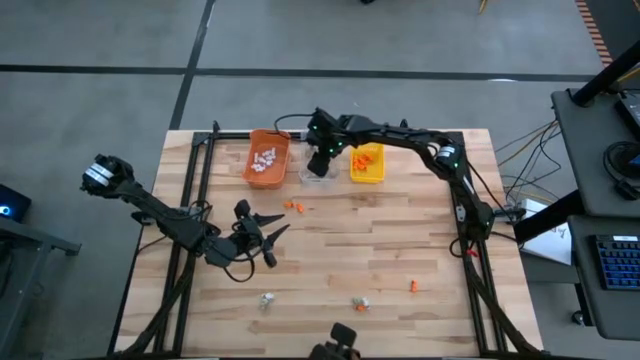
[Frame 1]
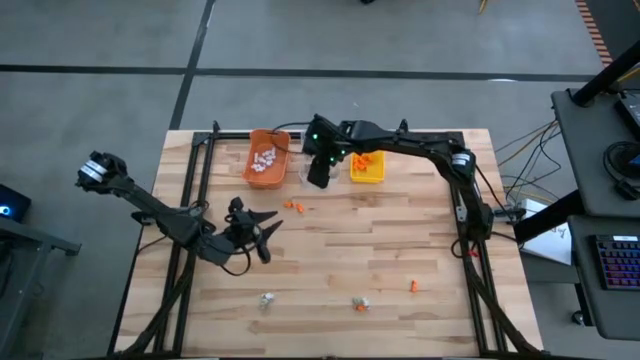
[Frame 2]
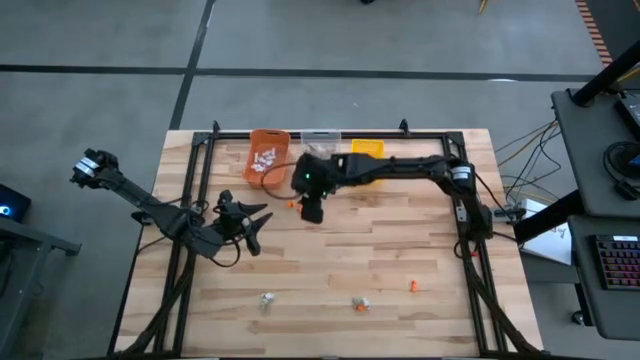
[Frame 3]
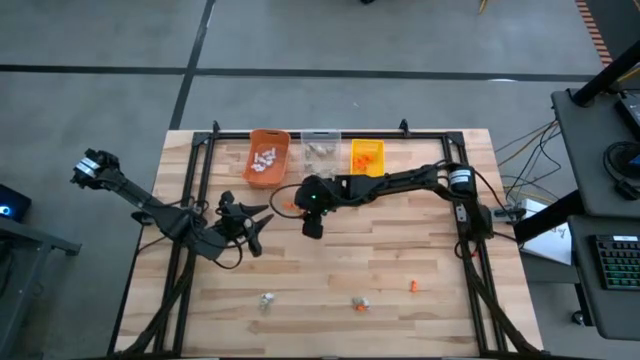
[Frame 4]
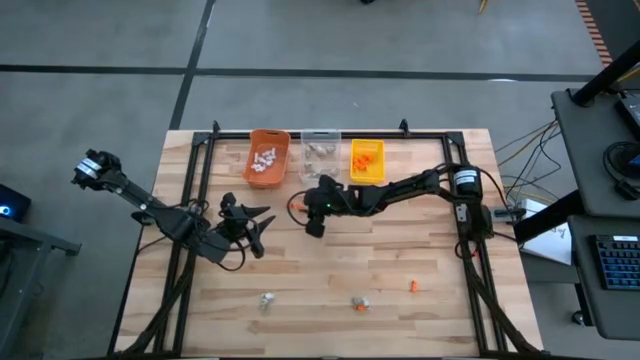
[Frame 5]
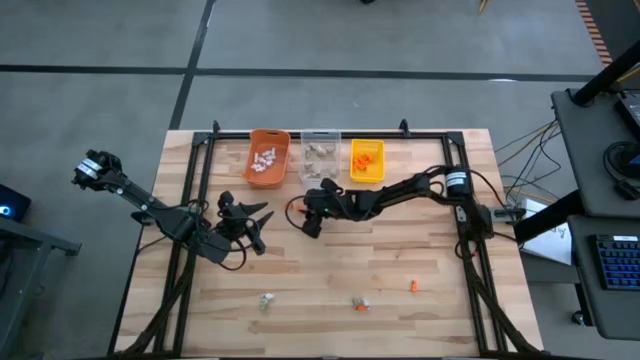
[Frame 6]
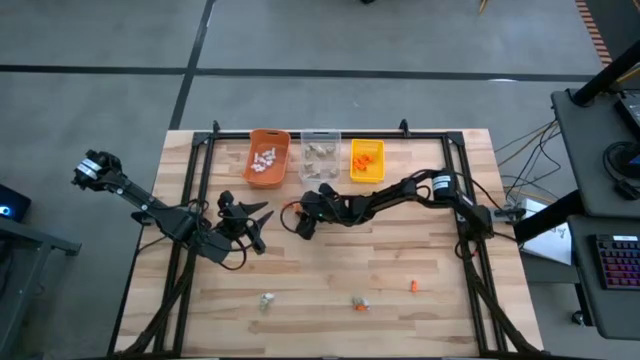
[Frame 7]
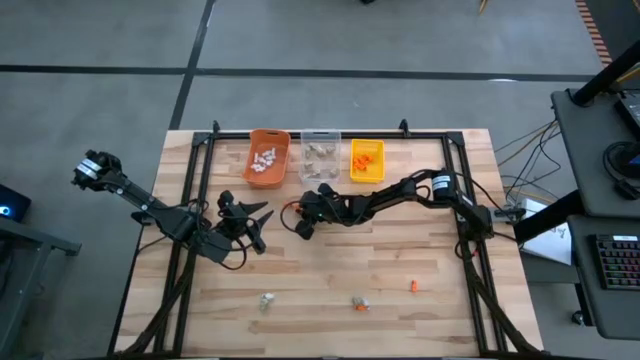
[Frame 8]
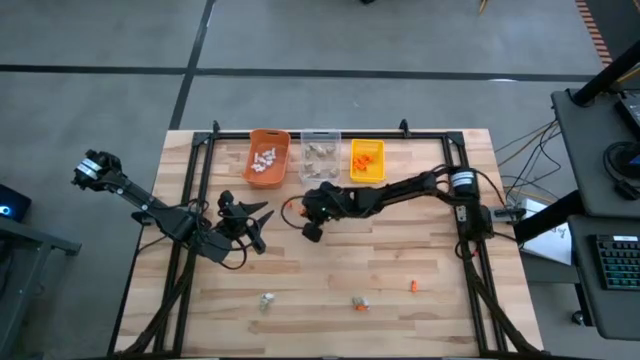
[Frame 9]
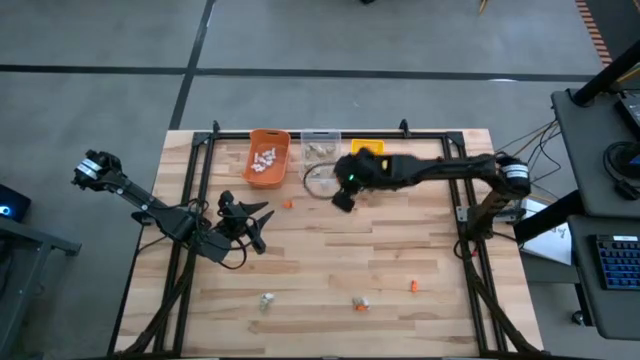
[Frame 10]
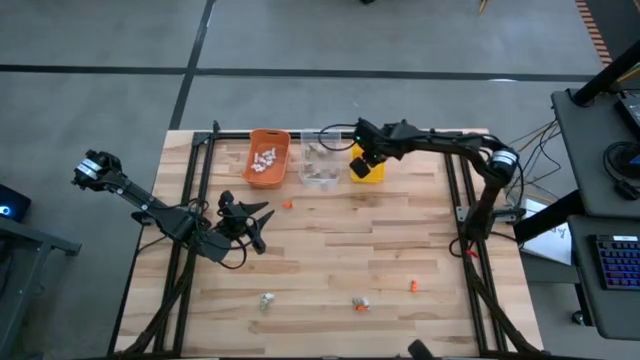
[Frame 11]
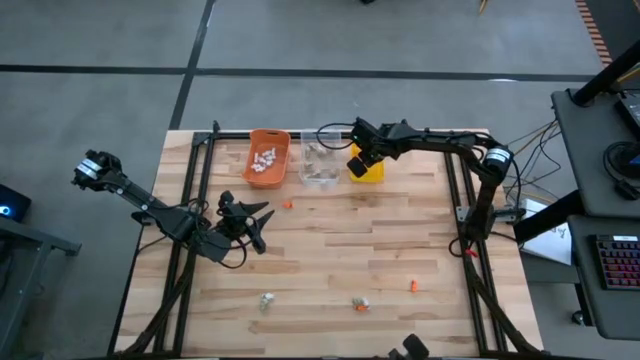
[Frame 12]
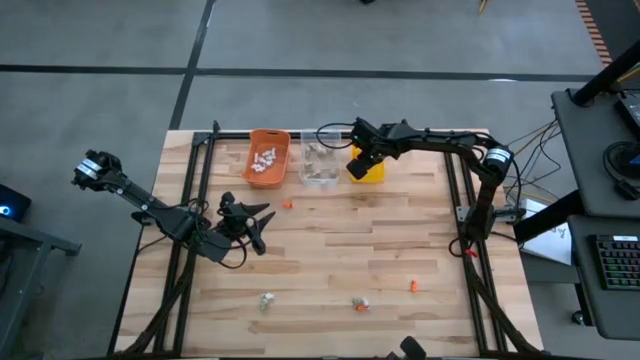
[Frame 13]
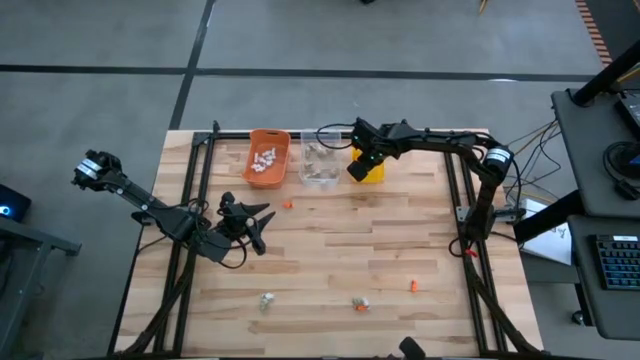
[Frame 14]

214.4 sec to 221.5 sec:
Task: Sort Halloween decoration
Put the orange skeleton toy into the yellow bin

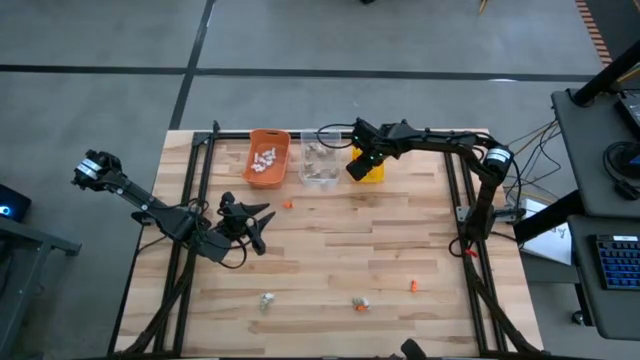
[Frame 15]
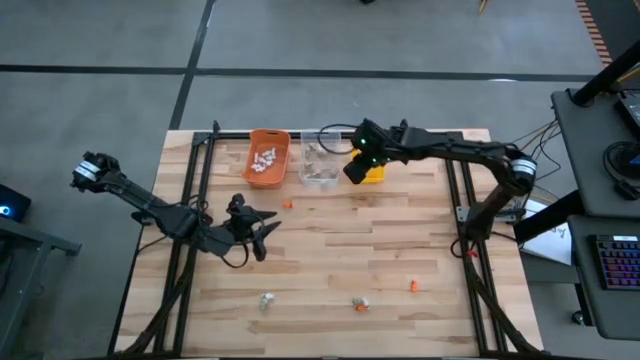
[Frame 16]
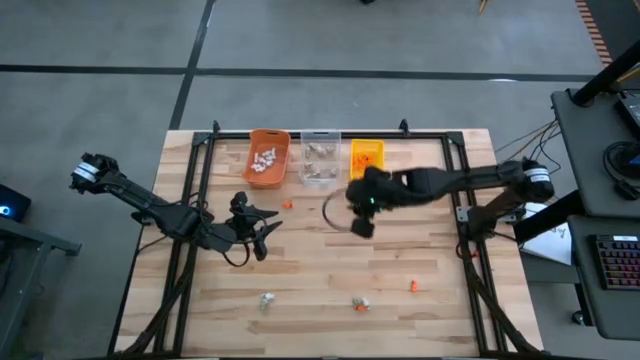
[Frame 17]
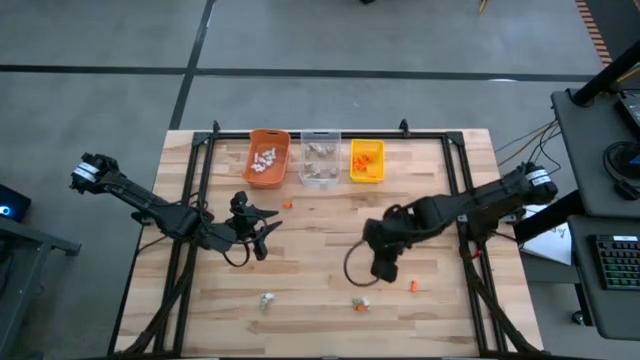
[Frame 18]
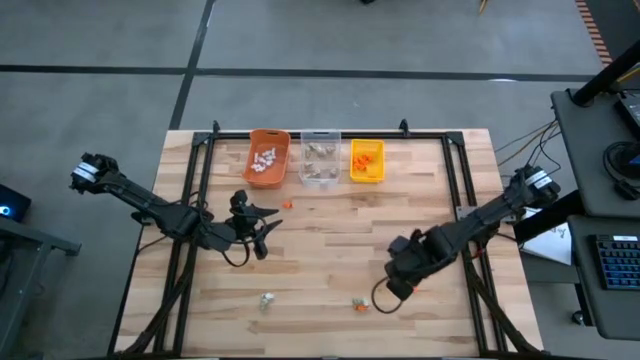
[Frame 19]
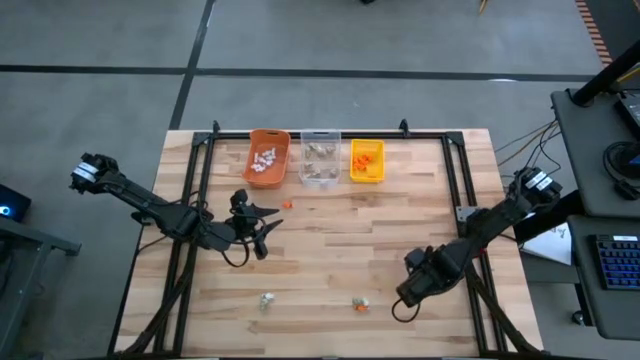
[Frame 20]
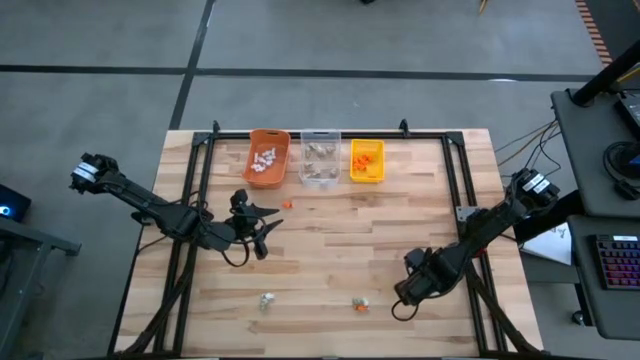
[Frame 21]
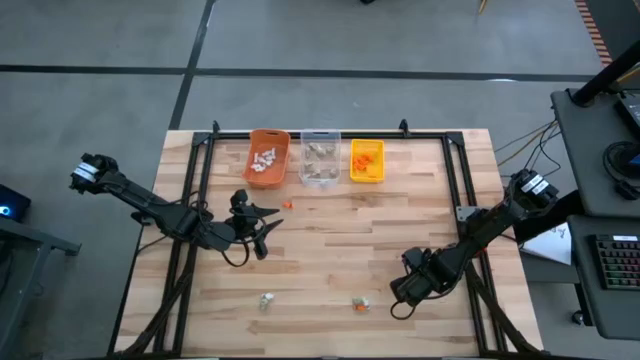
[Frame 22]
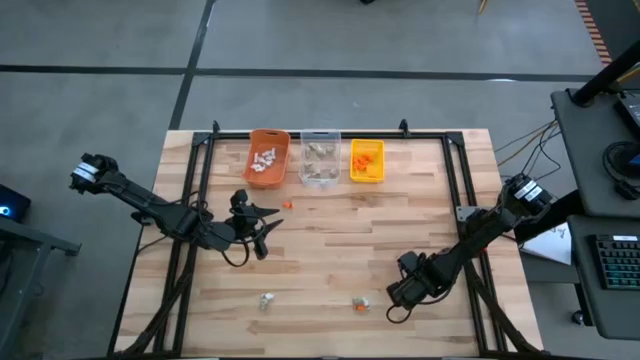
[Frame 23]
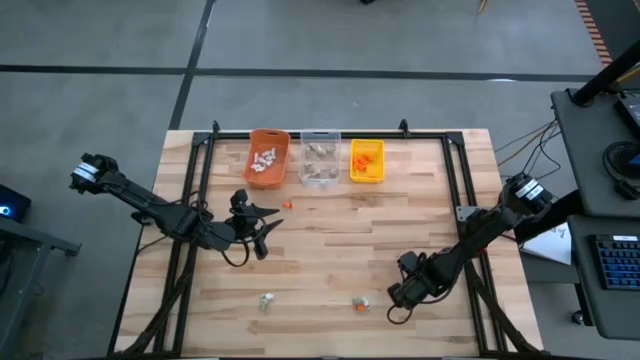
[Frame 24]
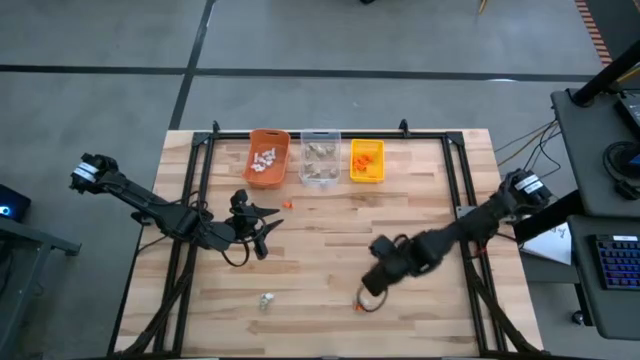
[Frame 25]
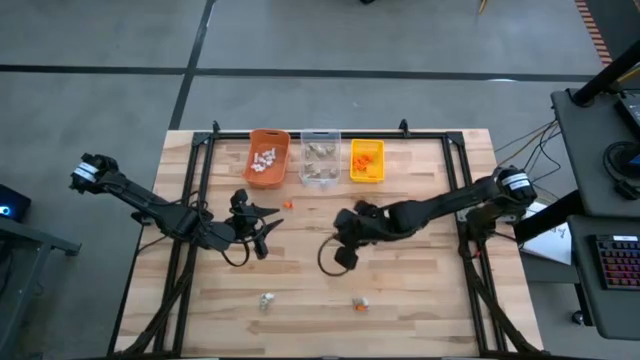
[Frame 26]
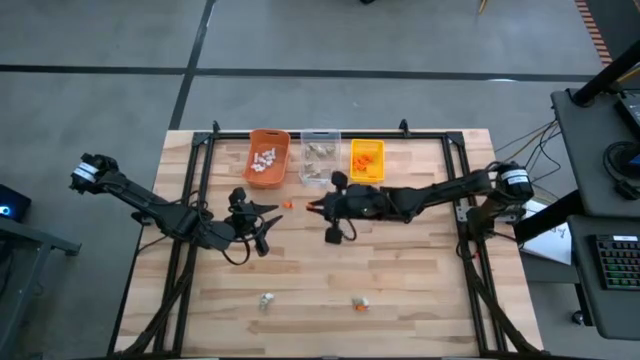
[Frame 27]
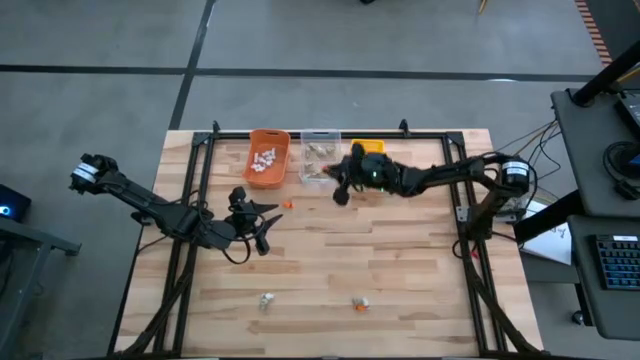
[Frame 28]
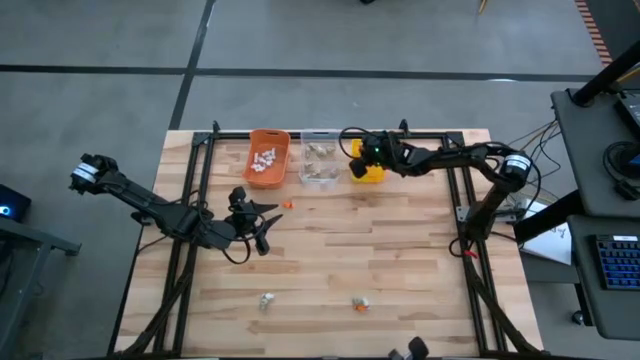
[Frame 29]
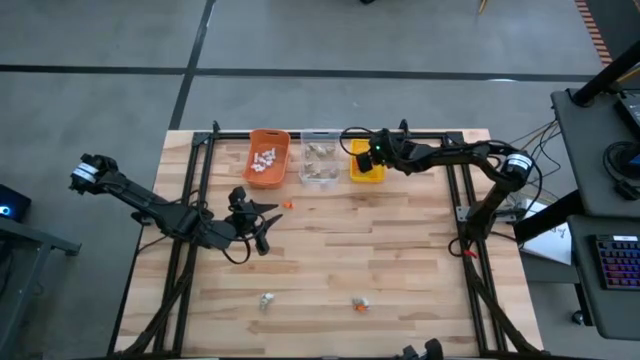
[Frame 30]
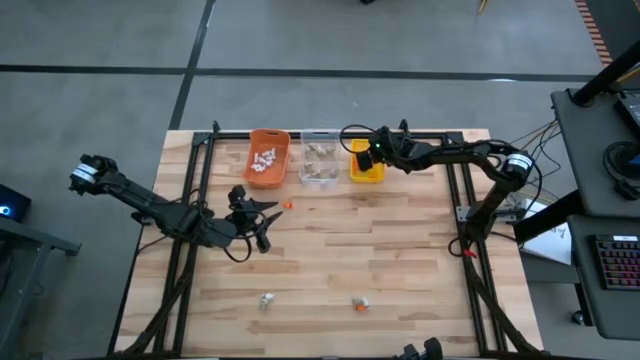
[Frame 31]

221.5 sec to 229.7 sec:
Put the orange skeleton toy into the yellow bin

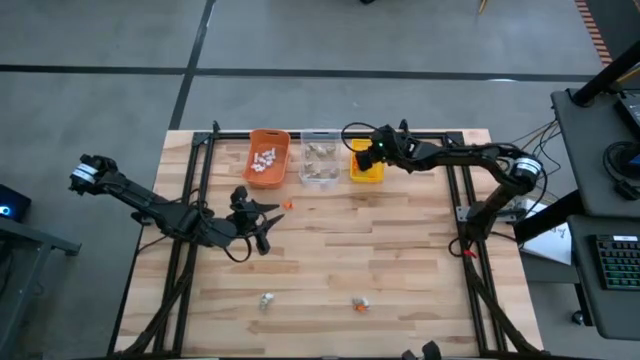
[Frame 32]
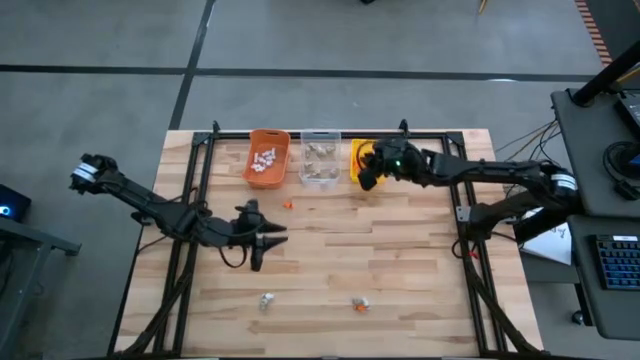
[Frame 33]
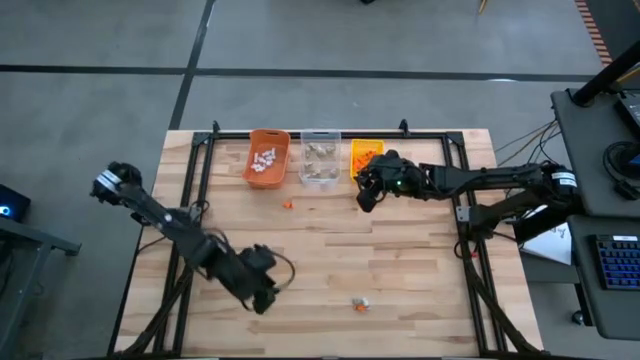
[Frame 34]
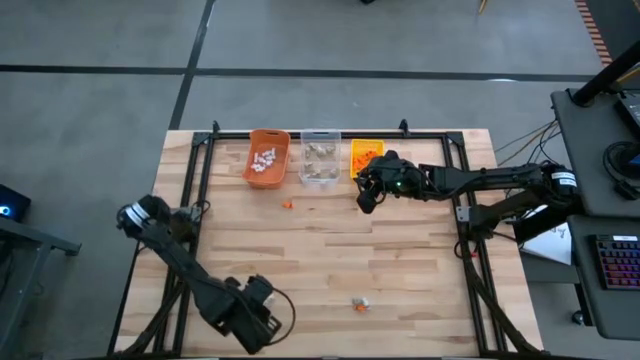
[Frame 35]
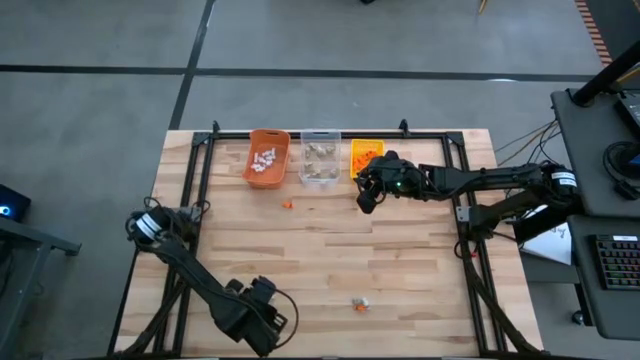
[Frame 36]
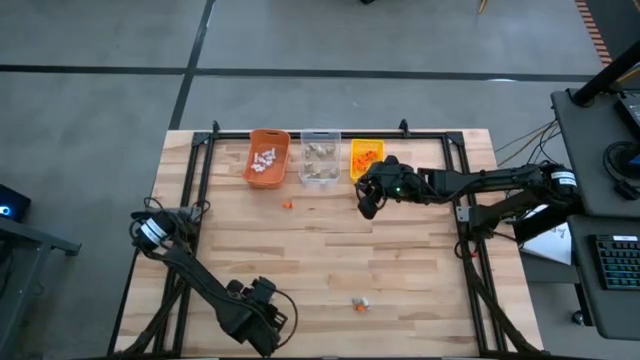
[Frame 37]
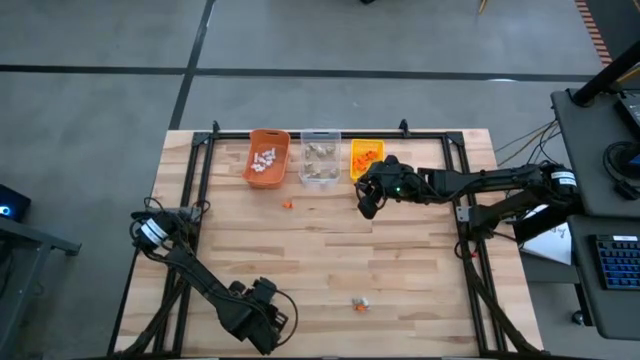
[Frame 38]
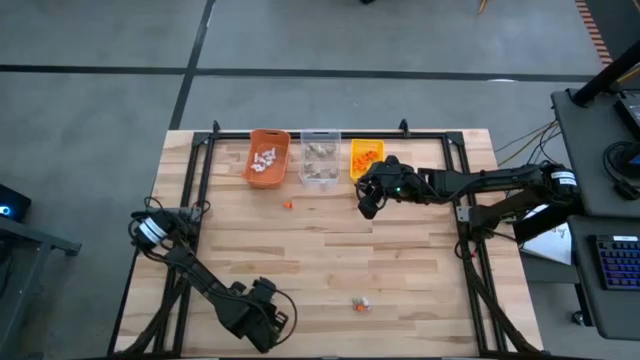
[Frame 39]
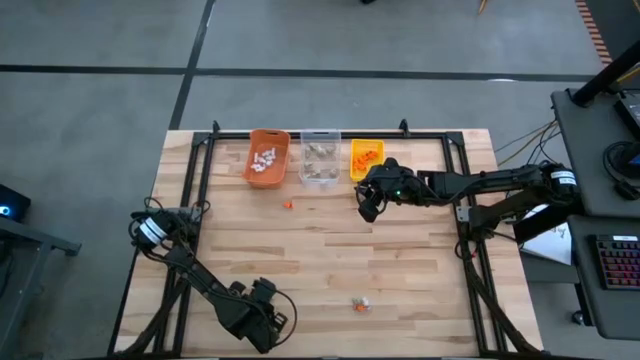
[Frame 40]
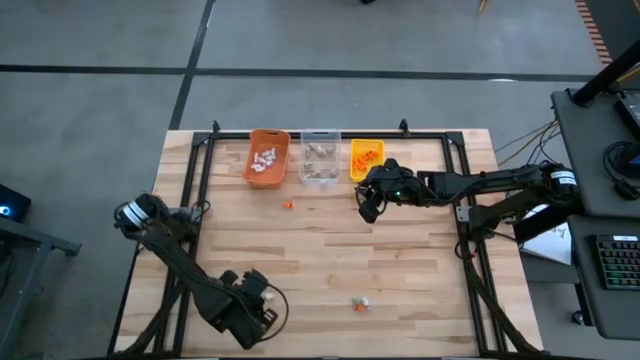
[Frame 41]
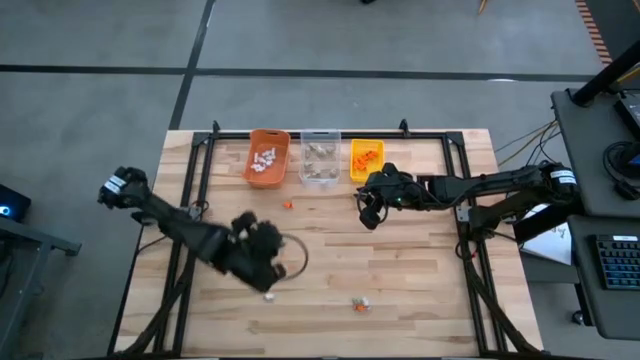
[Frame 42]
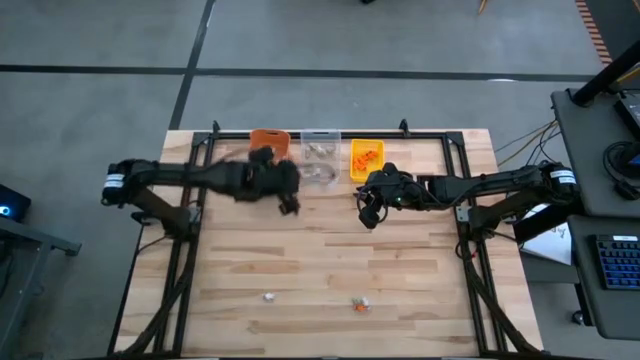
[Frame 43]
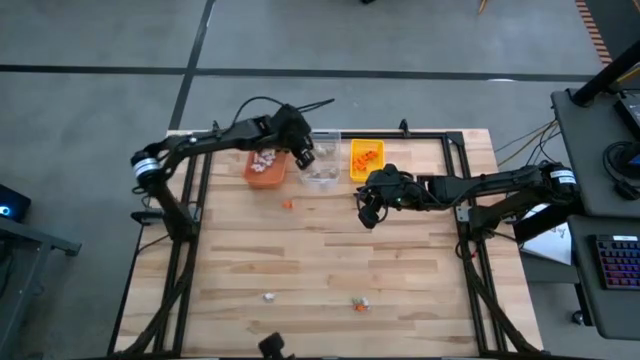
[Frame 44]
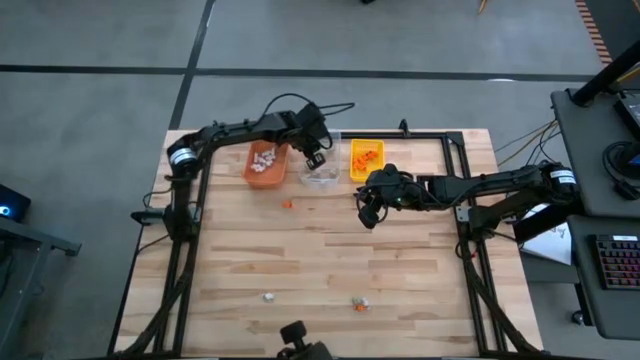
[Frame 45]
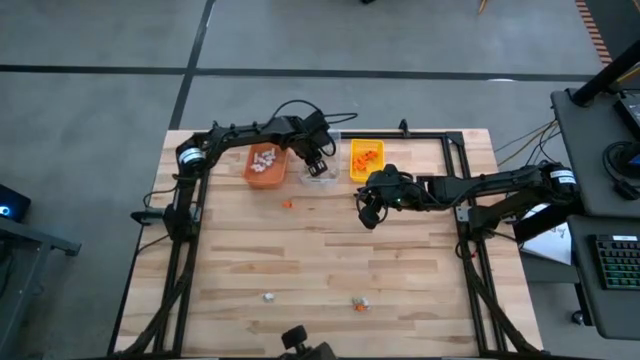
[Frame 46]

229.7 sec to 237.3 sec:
Put the gray skull toy into the transparent bin
